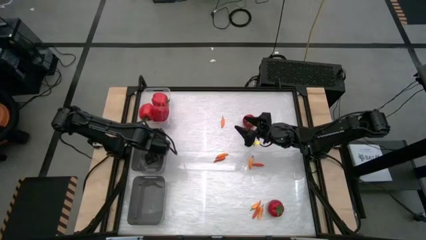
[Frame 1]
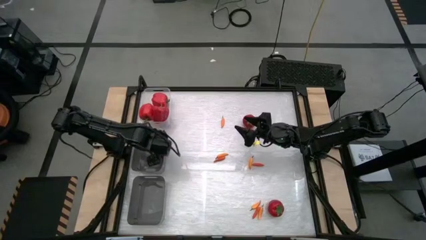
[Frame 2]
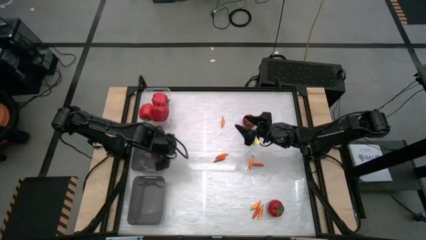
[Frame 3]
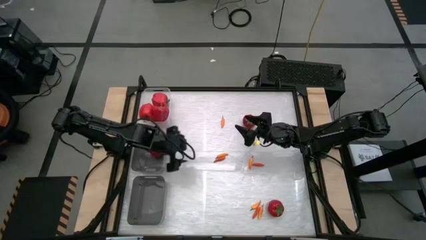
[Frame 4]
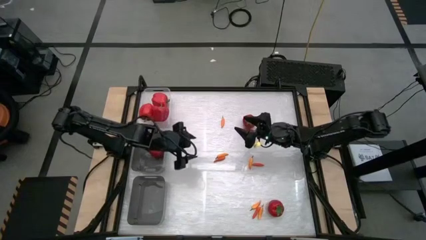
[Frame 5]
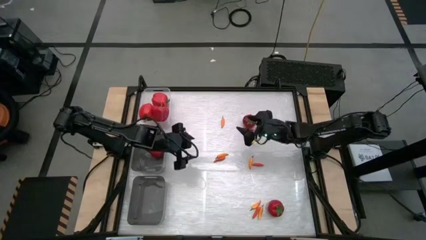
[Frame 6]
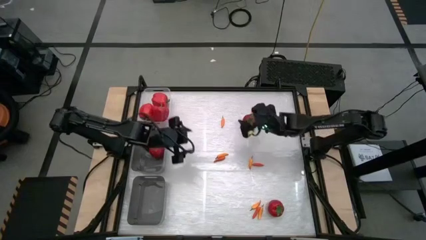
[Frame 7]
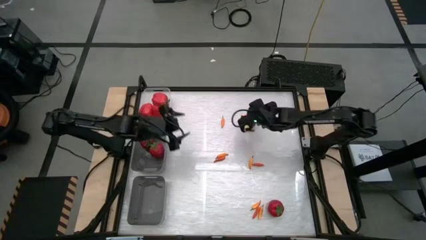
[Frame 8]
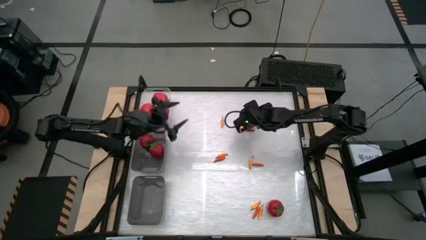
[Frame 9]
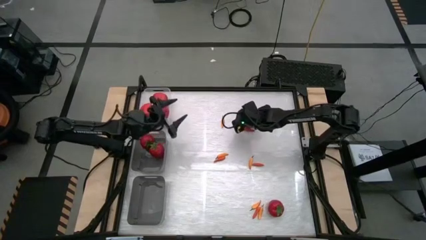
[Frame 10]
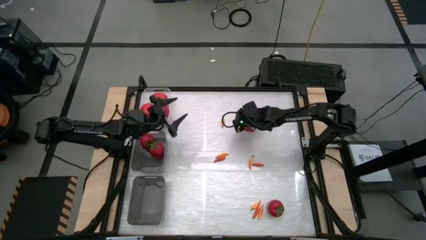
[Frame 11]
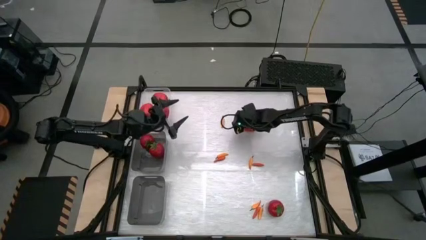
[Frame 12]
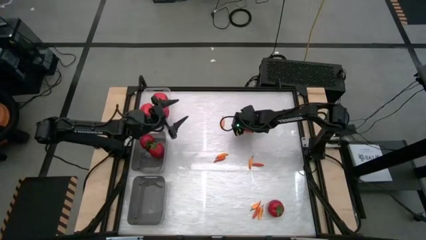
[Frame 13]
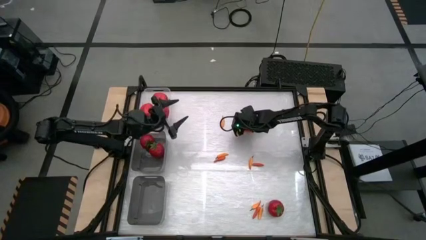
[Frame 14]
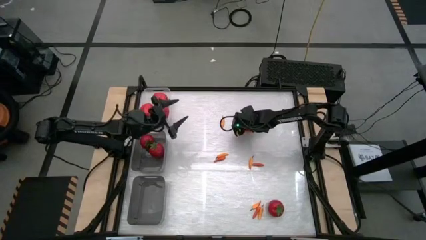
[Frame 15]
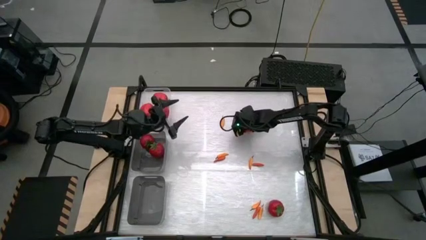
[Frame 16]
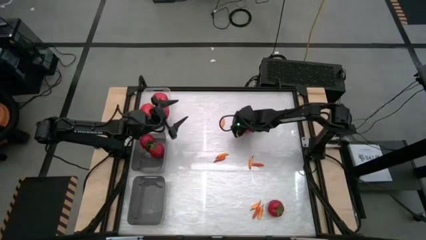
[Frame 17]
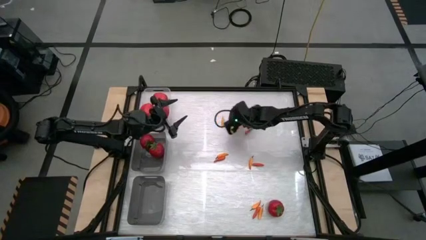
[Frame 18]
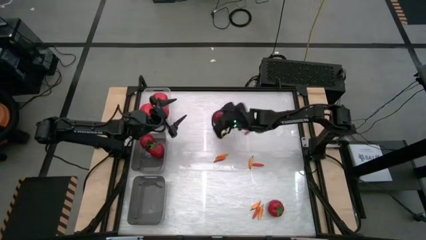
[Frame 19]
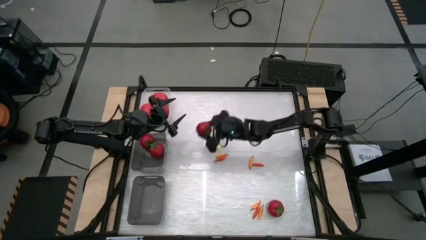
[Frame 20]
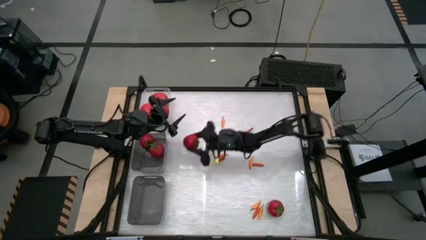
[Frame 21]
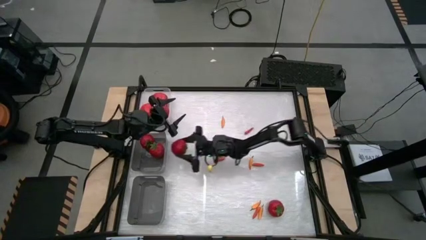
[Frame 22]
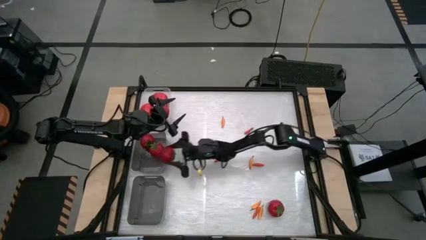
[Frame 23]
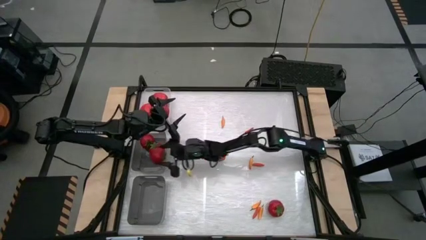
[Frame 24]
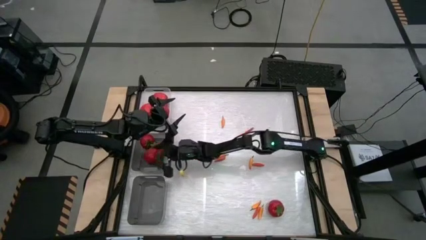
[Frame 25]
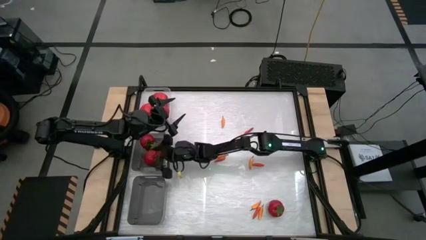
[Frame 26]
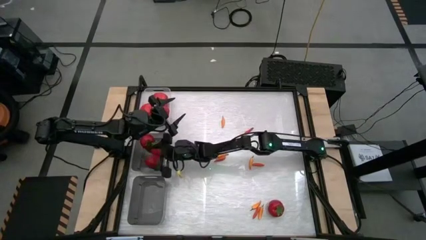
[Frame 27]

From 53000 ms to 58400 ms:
Task: Sort produce into baskets
Put the top tomato into the top black transparent bin

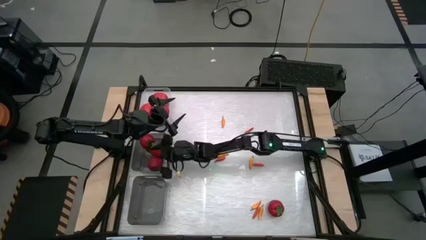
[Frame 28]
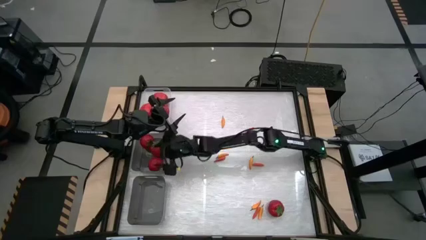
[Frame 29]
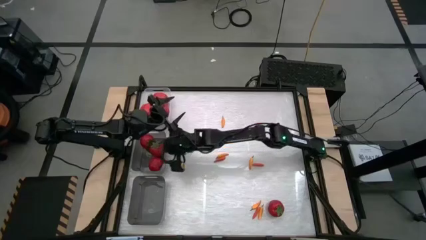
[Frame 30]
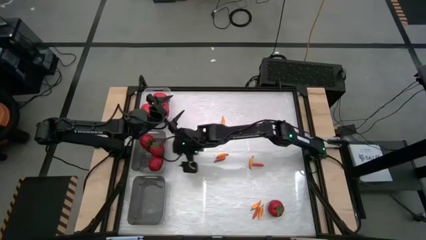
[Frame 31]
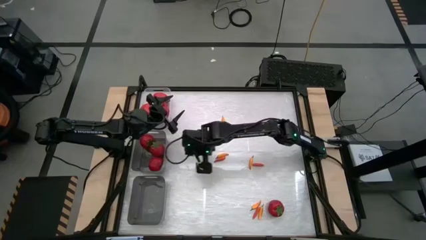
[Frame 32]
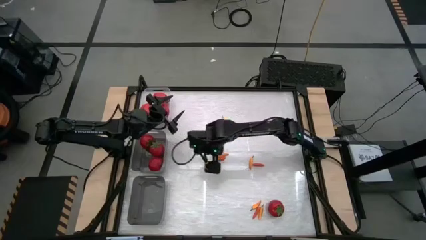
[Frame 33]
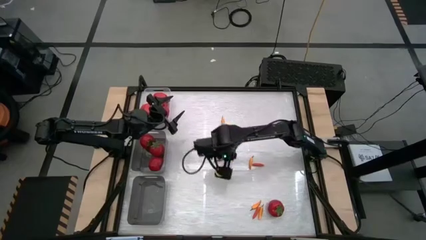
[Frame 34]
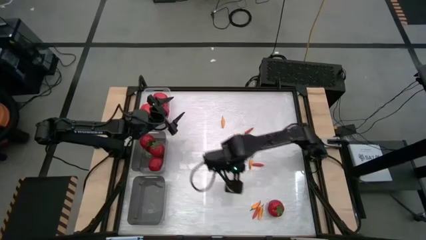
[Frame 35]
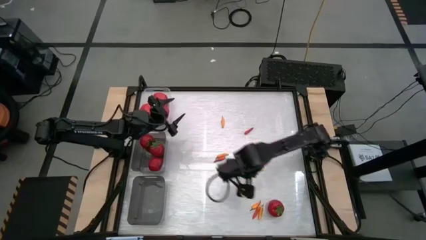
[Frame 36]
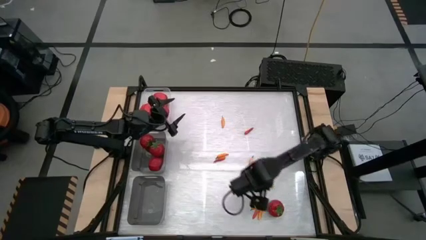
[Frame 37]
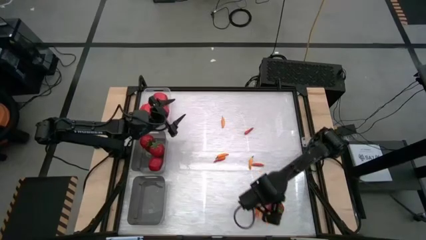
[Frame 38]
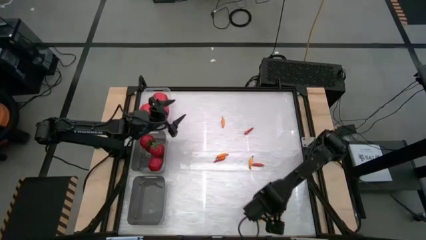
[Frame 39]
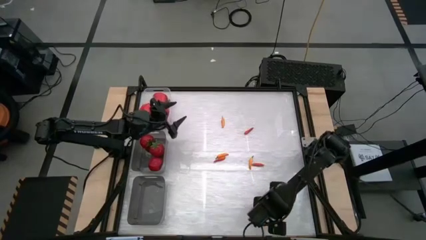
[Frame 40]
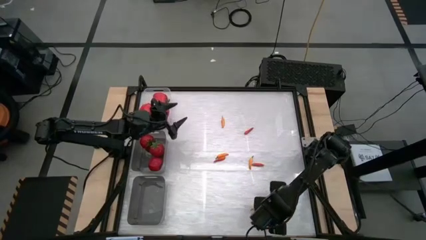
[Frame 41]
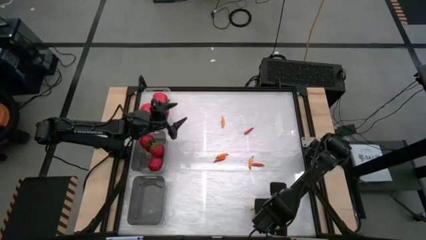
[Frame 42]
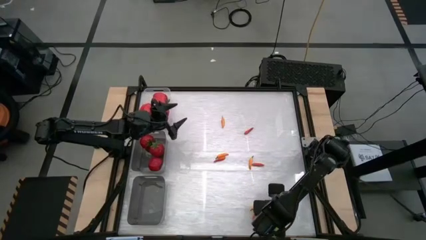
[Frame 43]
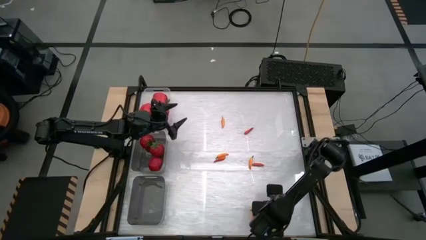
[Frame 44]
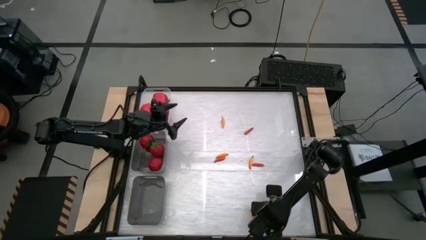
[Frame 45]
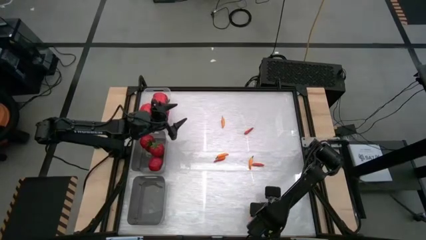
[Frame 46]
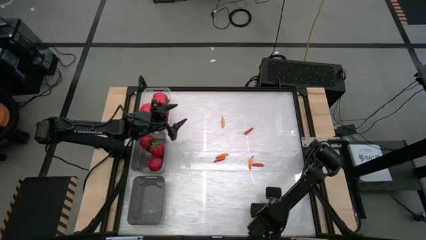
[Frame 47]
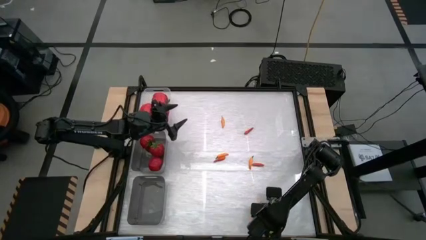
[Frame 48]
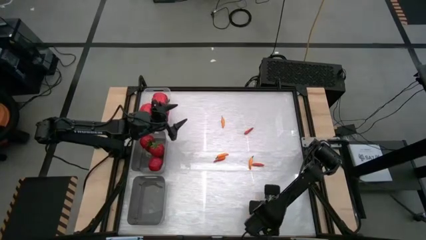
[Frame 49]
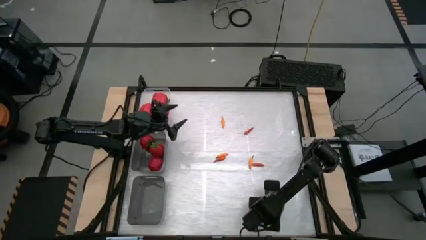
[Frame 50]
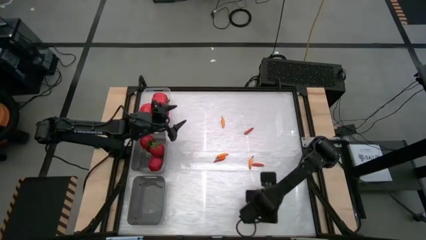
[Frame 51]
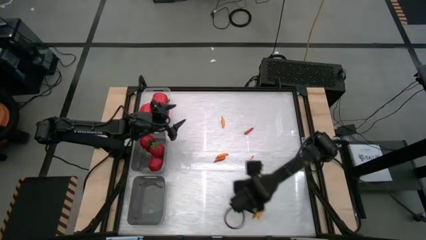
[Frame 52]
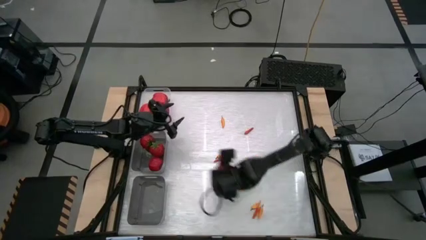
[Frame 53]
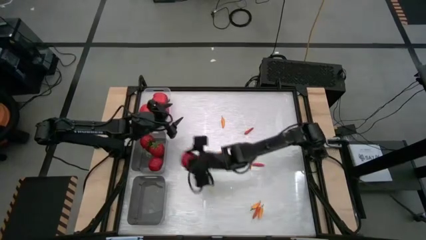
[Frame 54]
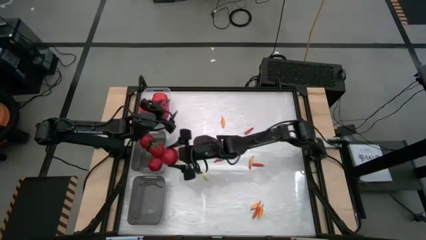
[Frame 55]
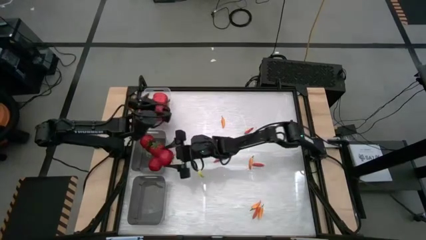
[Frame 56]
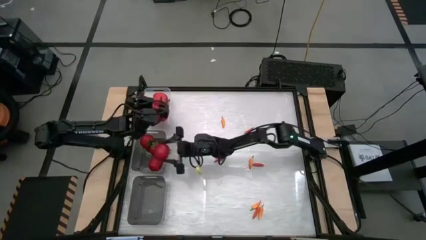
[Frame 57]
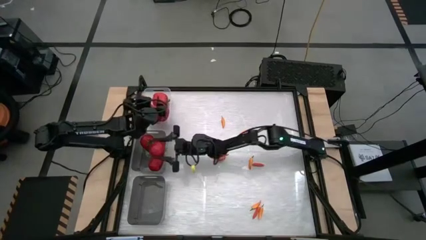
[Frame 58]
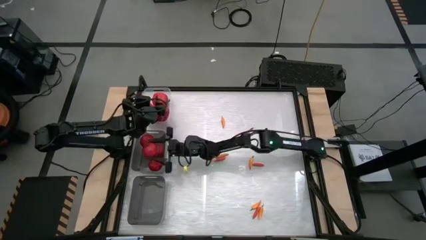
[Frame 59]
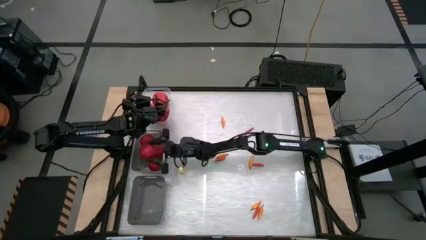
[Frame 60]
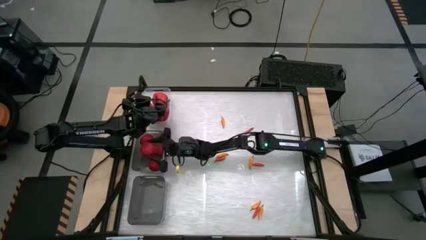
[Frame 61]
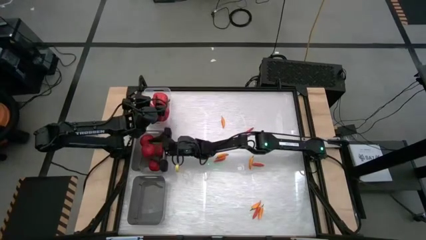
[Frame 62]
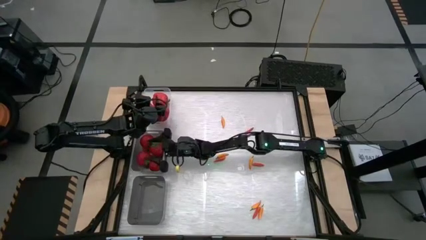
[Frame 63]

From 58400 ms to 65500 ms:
Put the tomato into the top black transparent bin

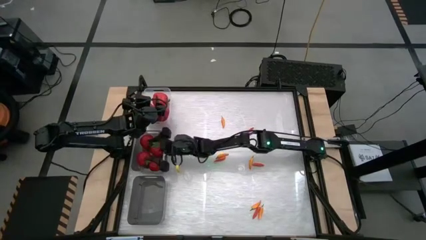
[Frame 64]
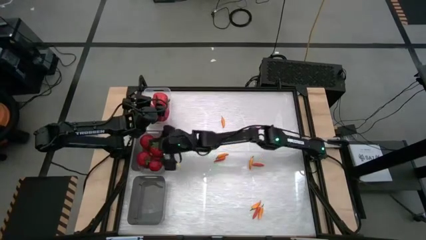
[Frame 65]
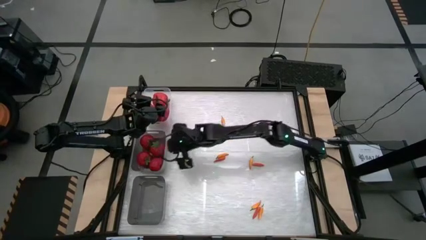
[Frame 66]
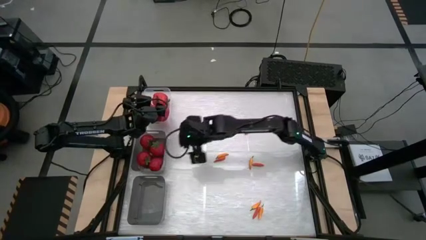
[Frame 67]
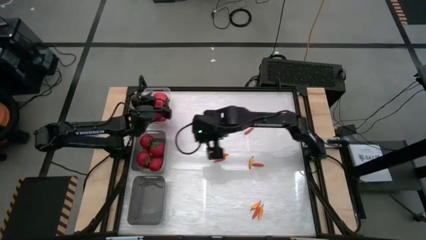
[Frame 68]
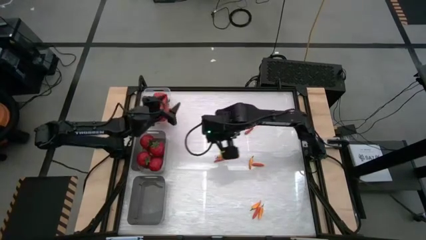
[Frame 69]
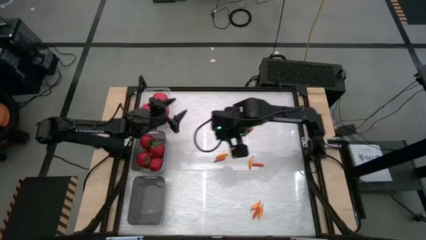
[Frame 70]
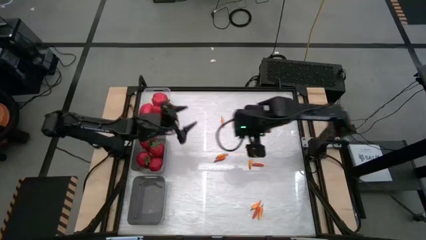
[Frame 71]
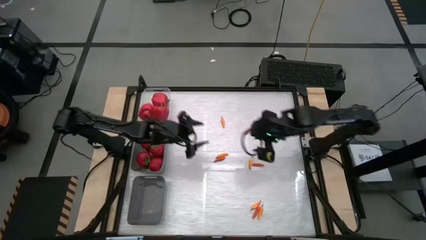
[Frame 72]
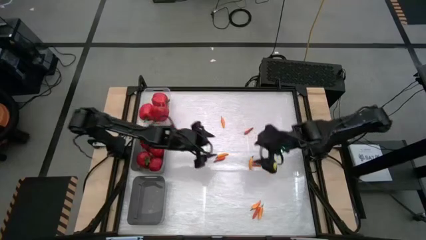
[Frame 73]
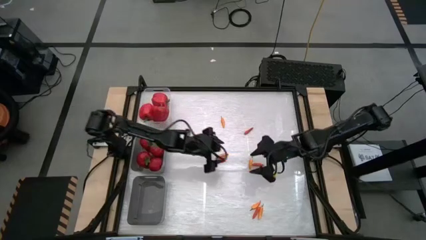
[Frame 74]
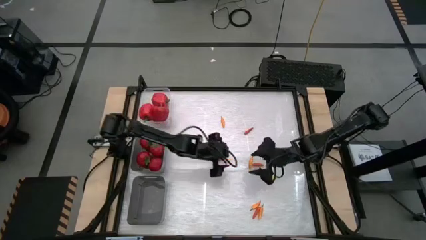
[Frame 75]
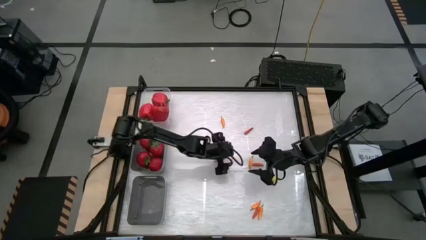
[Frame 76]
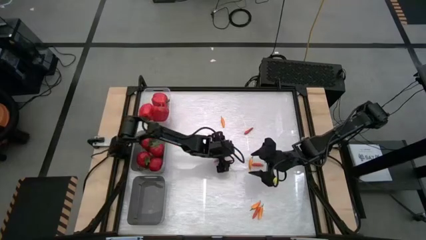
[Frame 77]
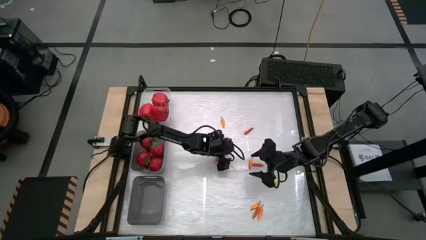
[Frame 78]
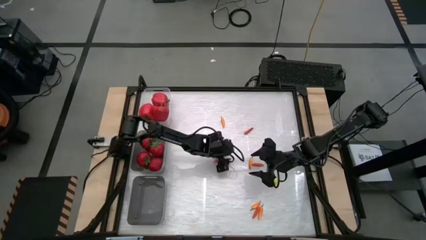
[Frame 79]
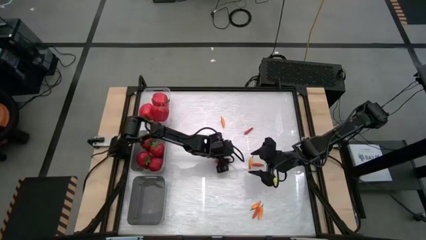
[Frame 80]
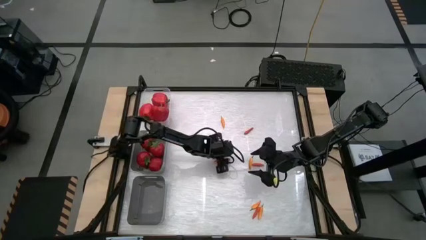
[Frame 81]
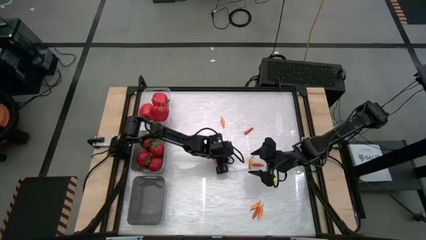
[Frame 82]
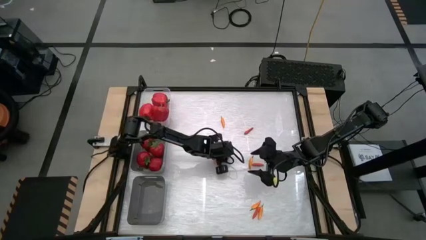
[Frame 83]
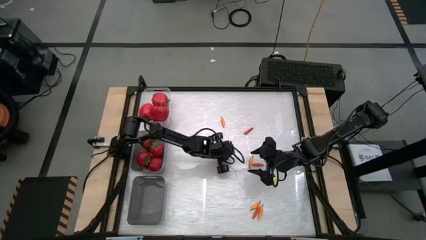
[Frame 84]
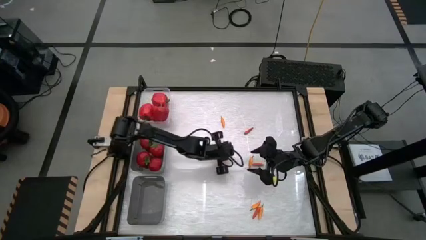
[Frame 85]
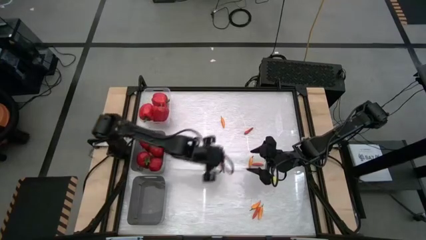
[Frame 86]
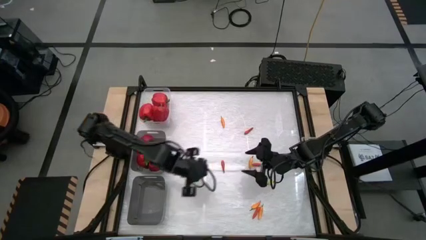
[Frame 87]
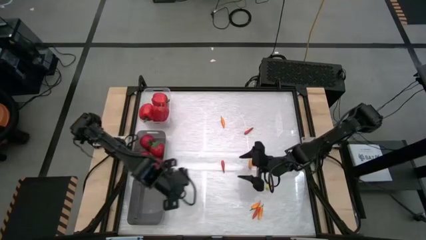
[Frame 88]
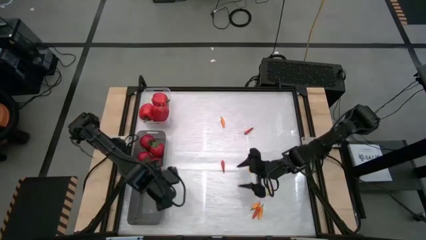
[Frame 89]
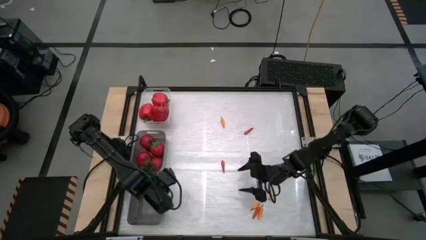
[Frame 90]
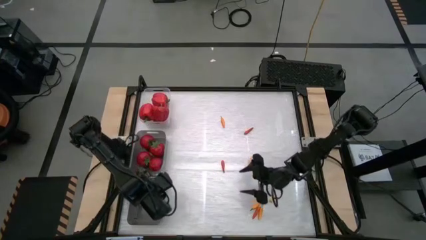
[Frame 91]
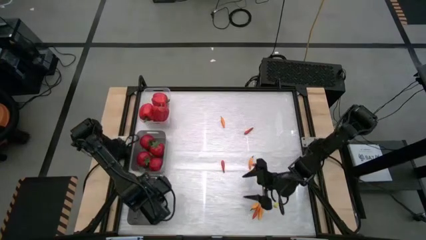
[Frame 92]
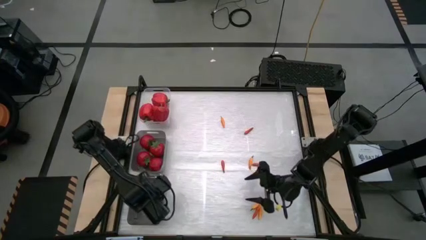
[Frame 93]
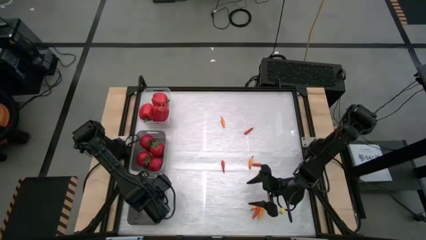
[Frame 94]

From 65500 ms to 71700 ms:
Put the center orange chili pepper into the bottom black transparent bin
